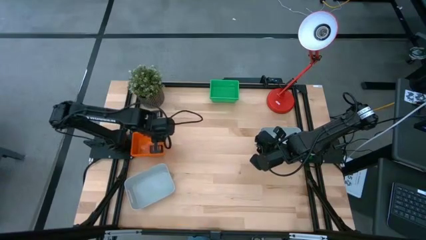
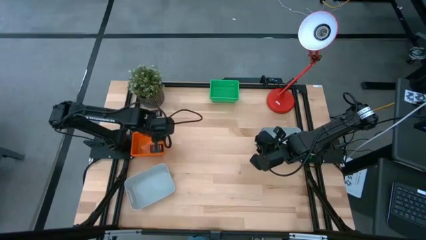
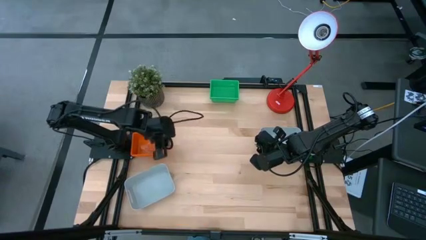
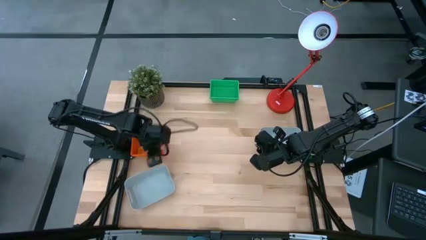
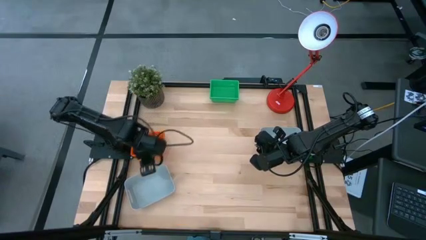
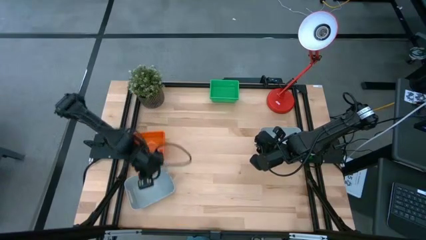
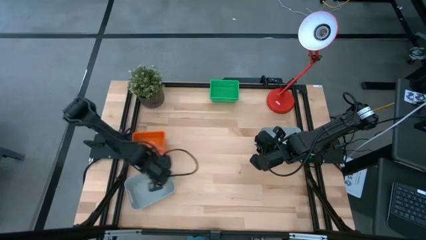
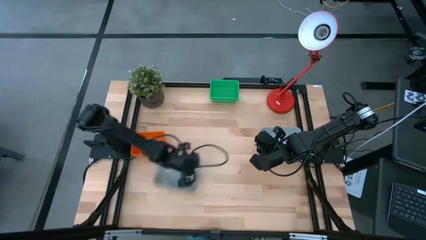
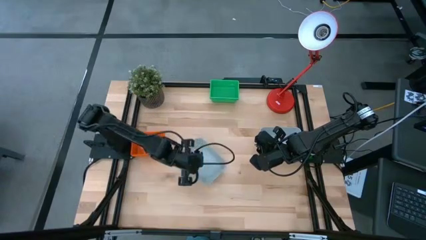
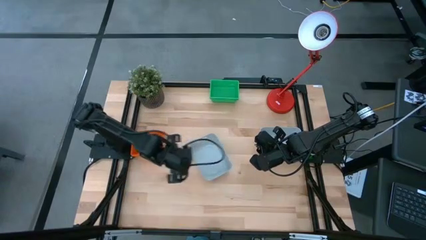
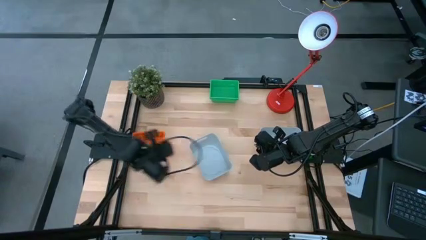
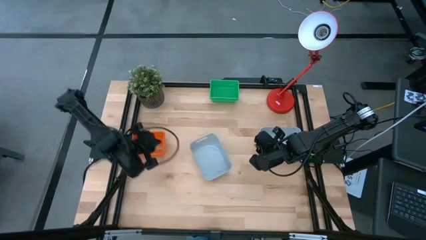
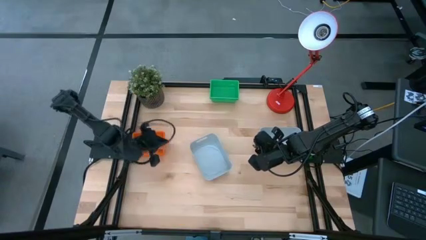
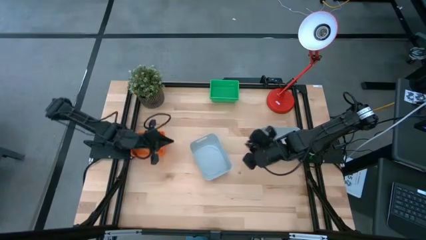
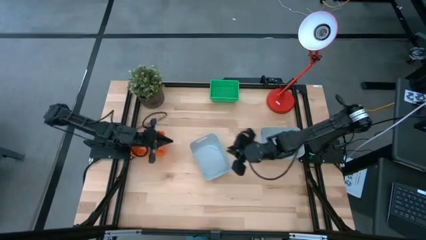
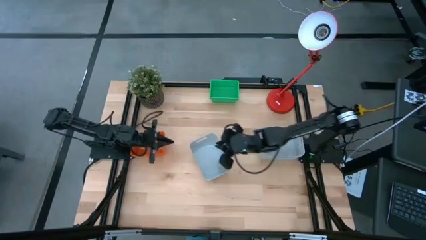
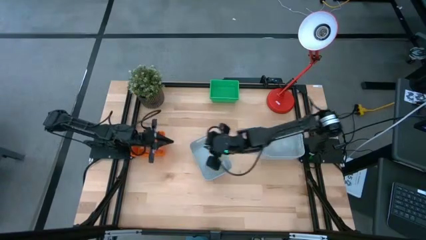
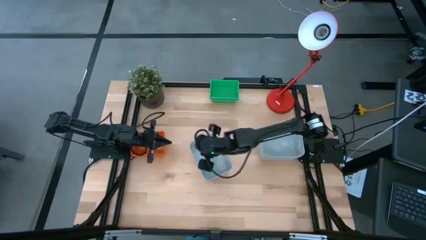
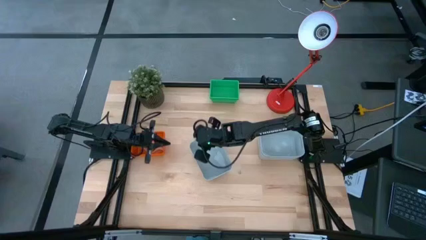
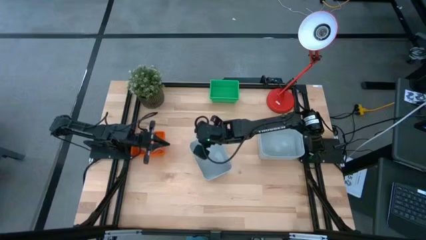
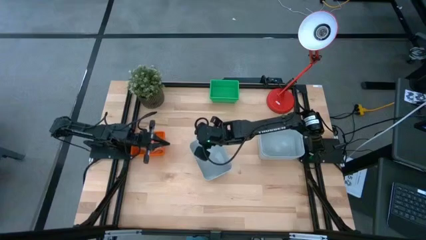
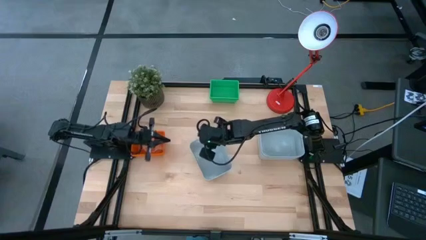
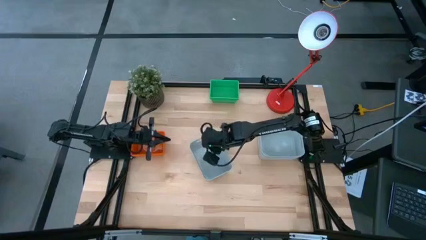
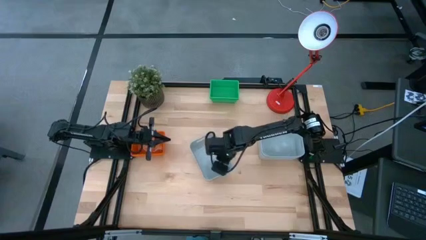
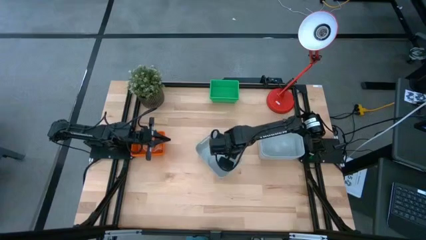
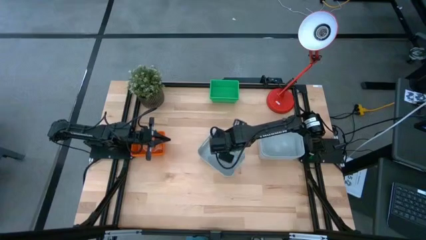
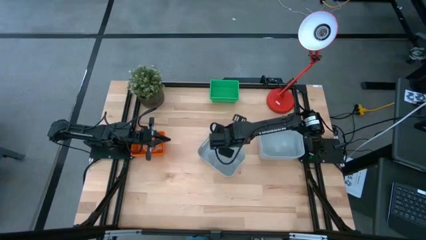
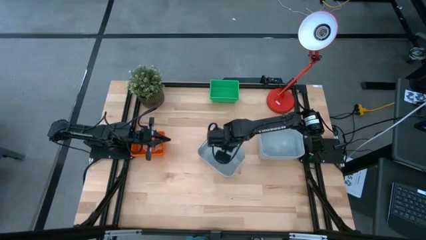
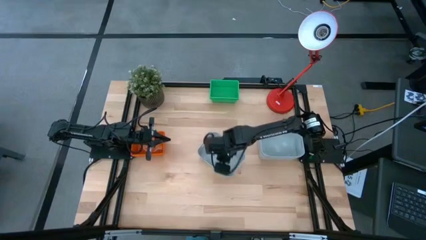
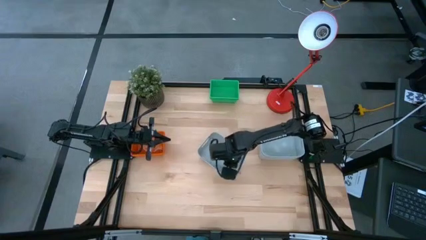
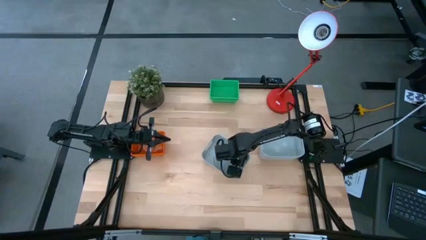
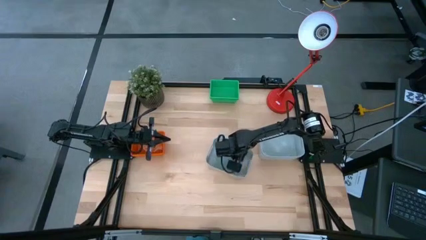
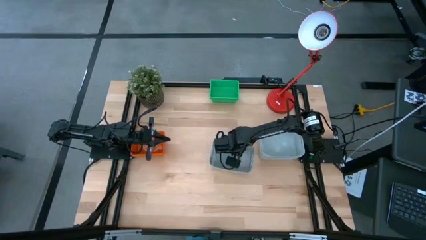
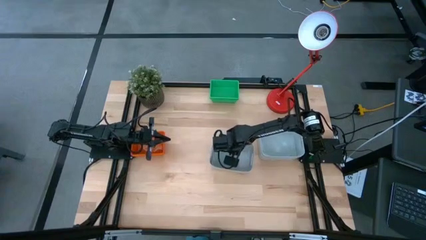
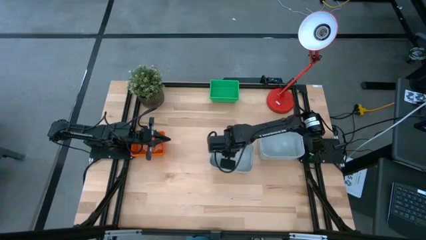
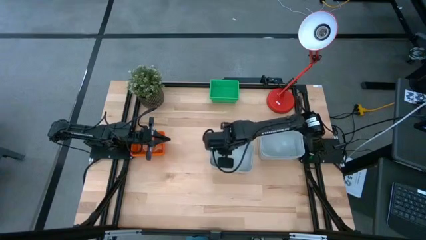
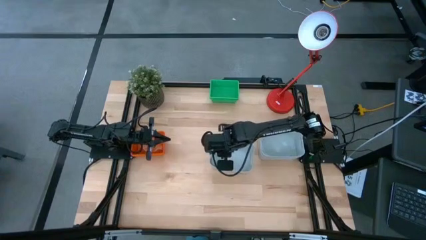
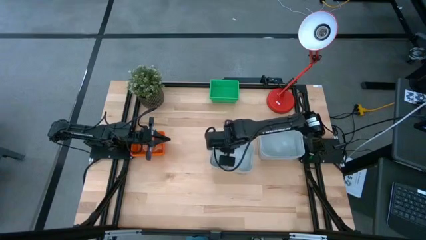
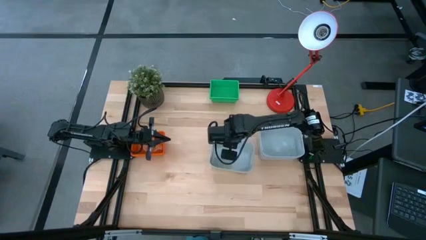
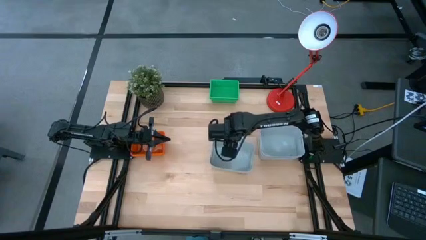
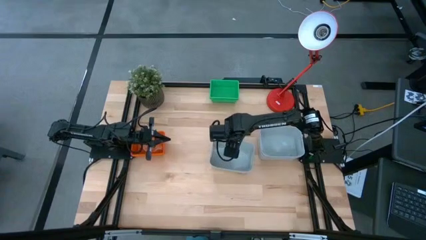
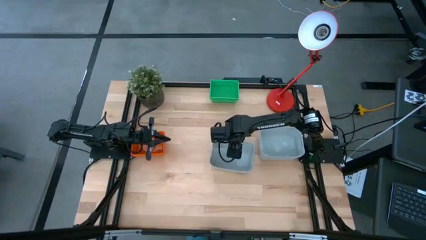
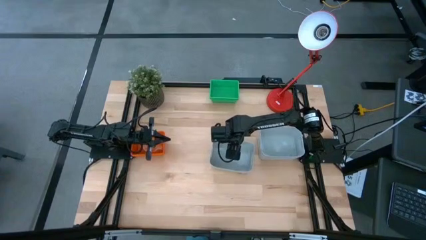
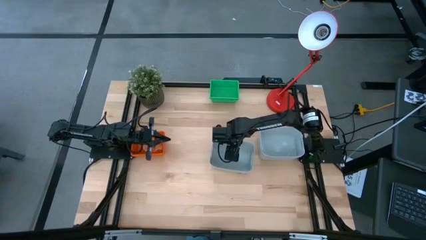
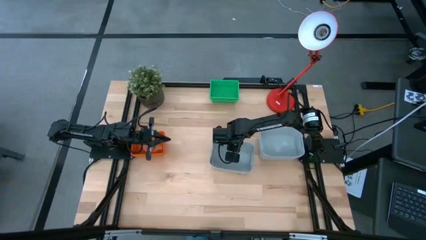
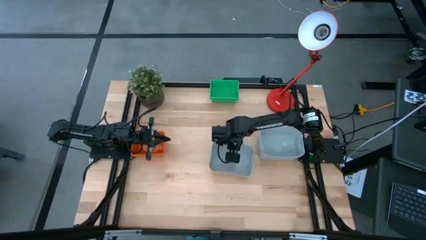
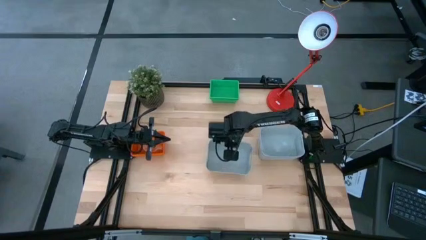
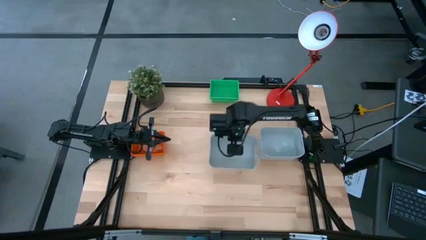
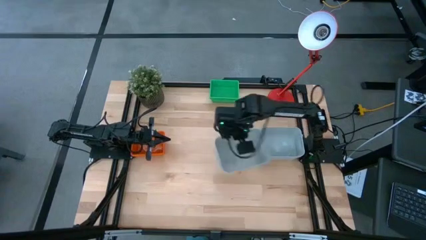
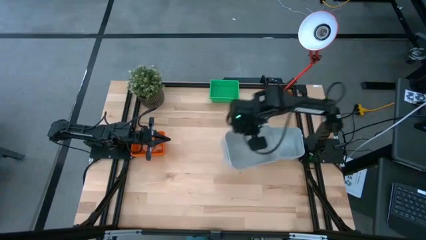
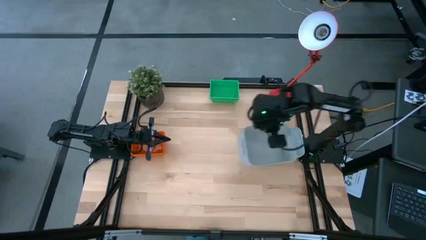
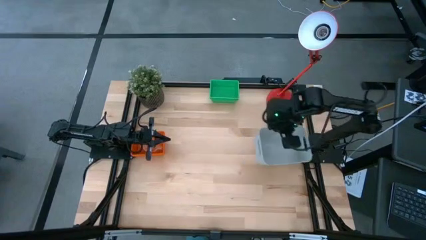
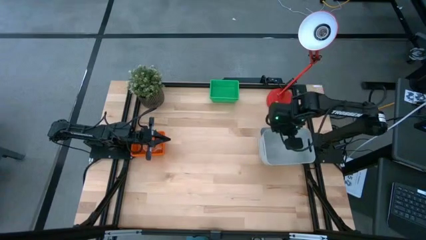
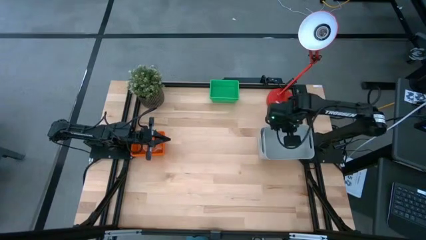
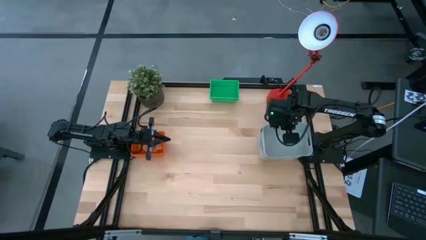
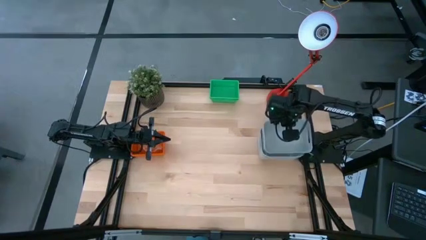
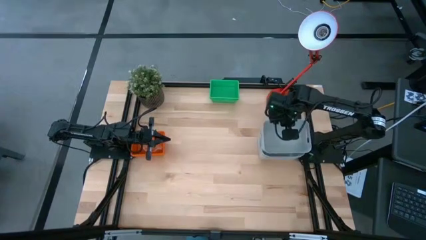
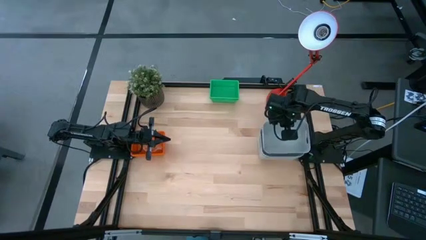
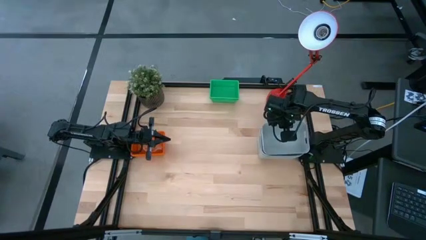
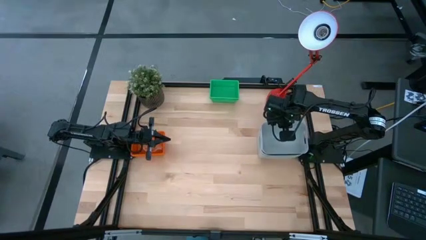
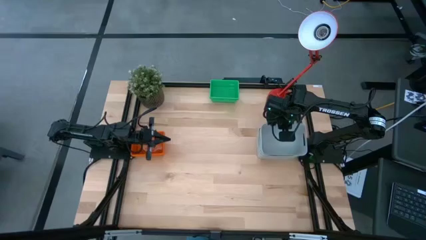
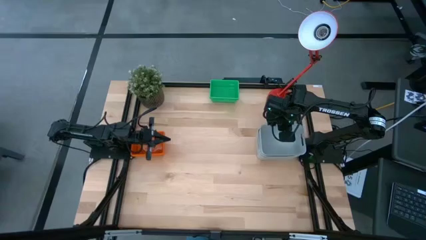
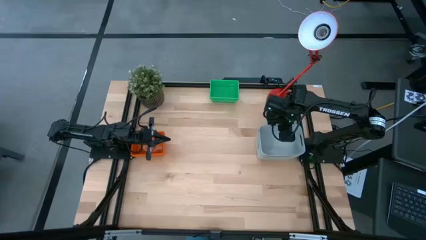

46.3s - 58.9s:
Stack the left gray bin onto the right gray bin

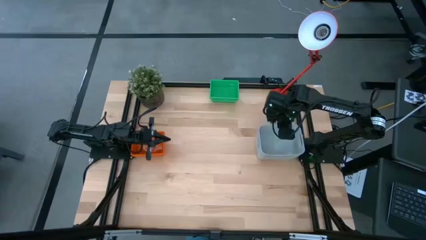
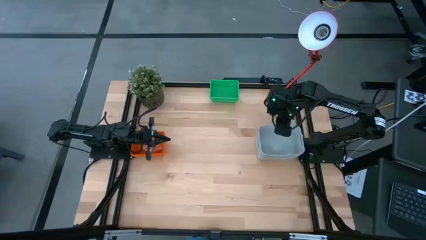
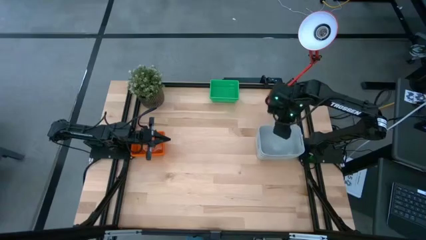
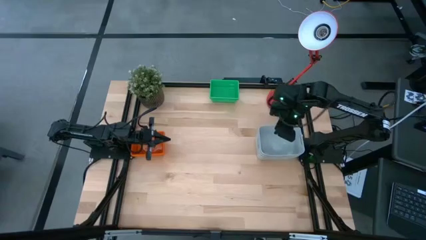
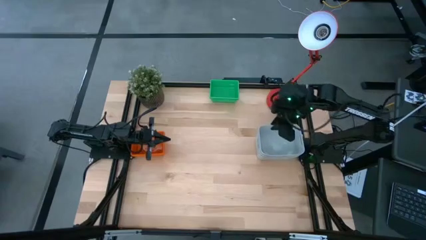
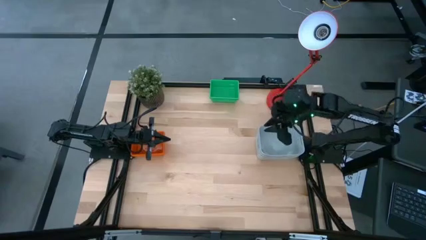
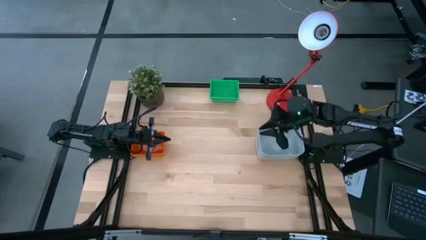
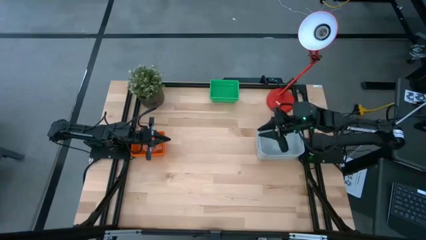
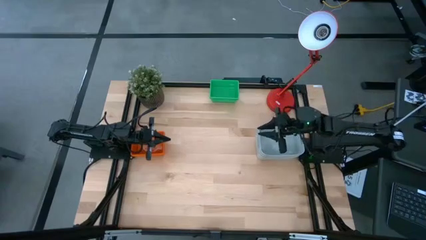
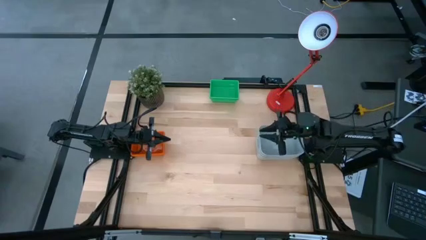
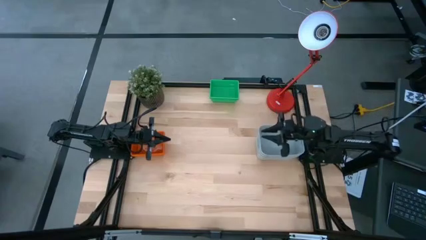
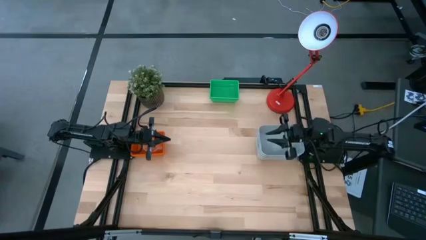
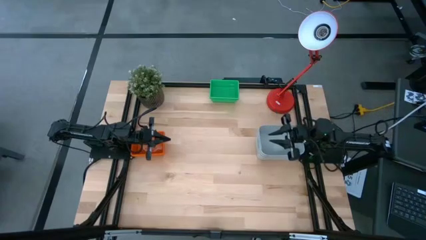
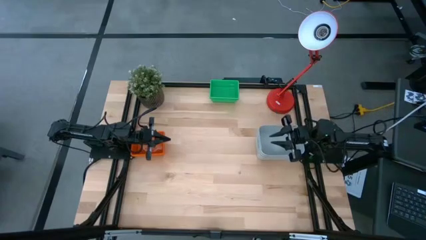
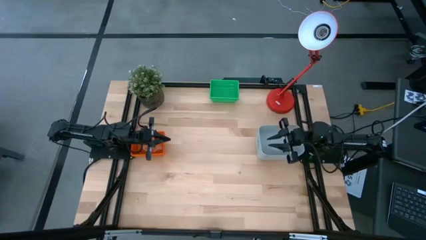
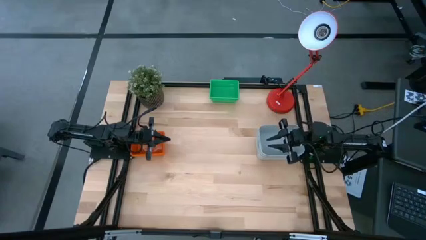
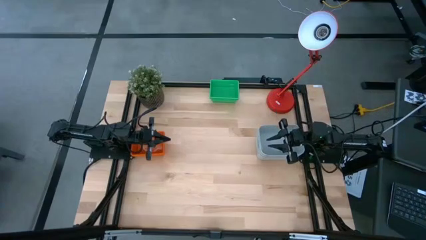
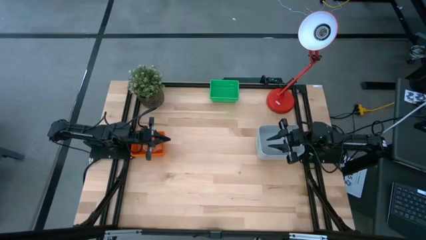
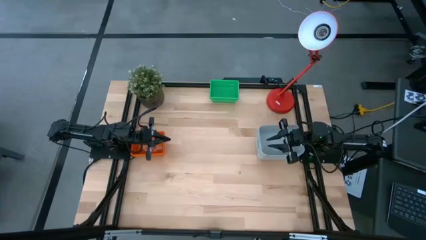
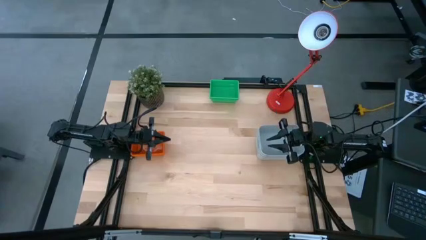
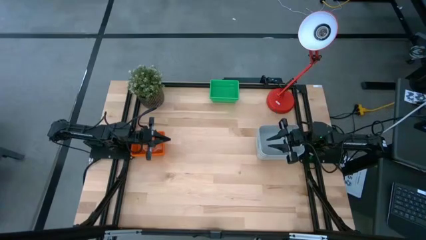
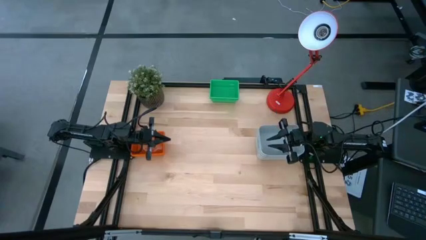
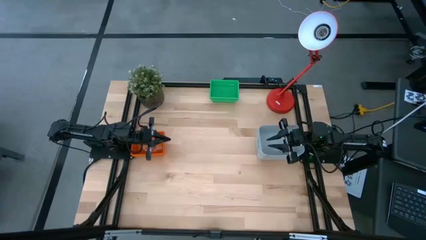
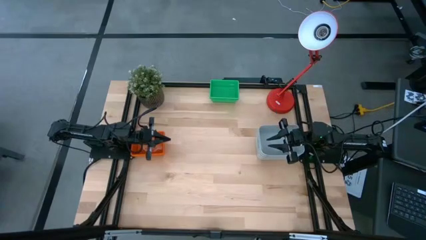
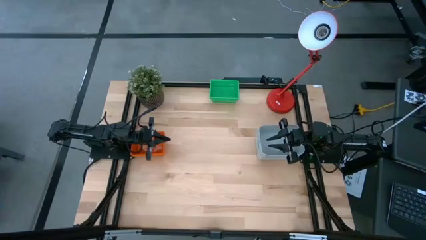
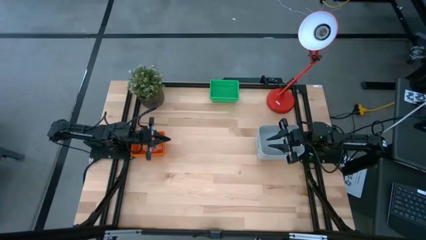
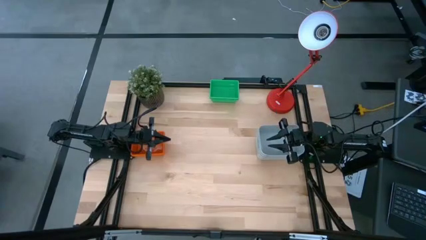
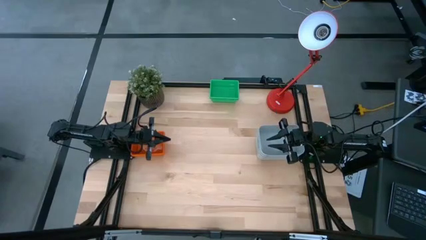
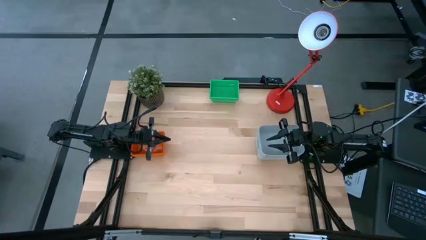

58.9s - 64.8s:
Return to Home Position
